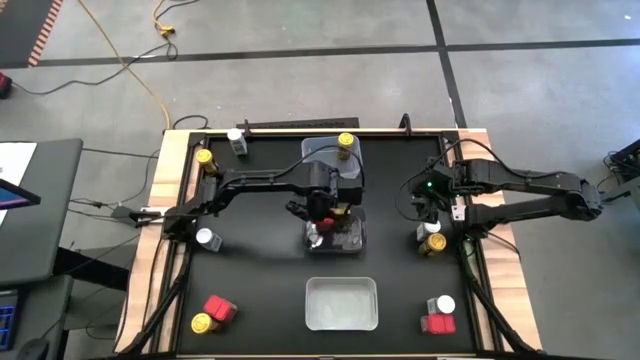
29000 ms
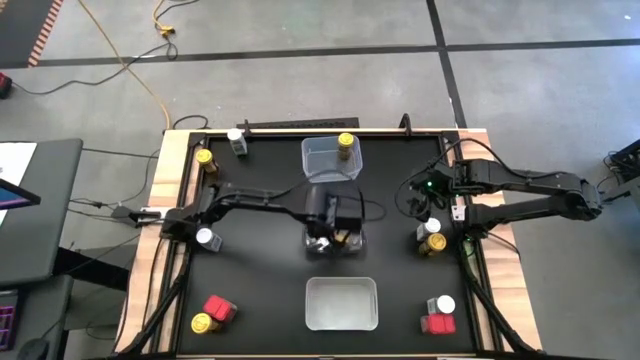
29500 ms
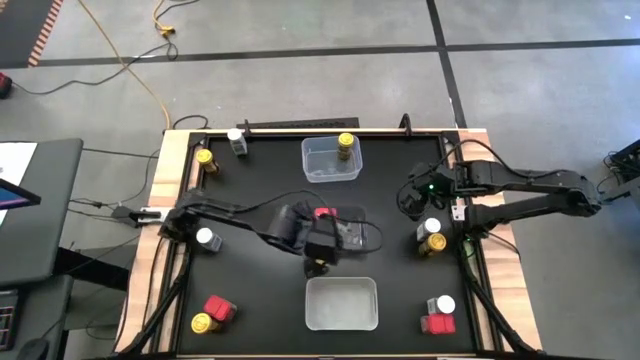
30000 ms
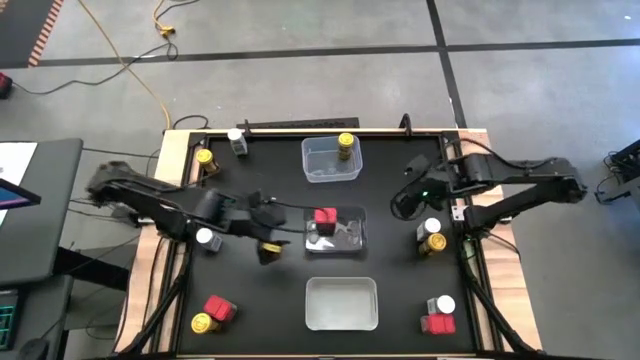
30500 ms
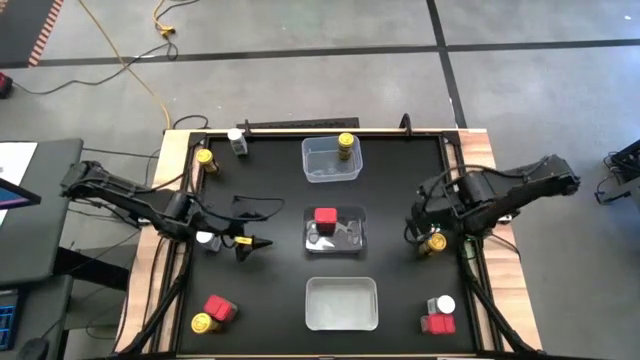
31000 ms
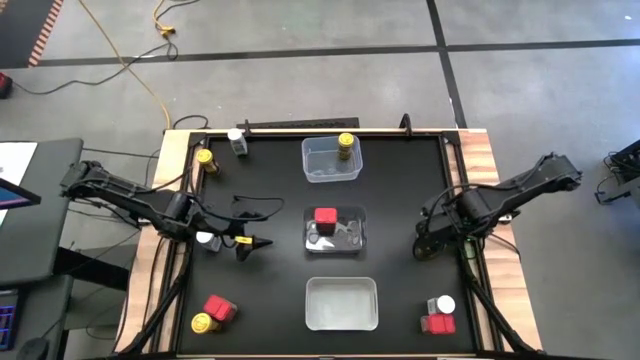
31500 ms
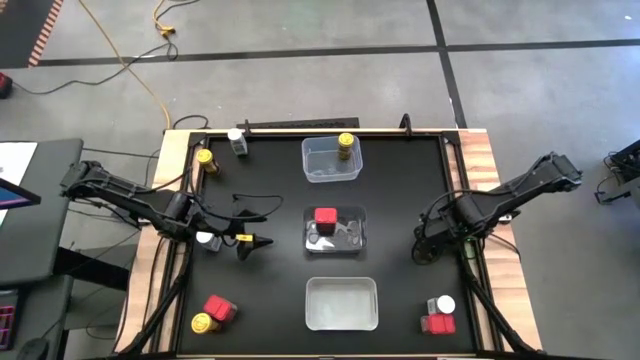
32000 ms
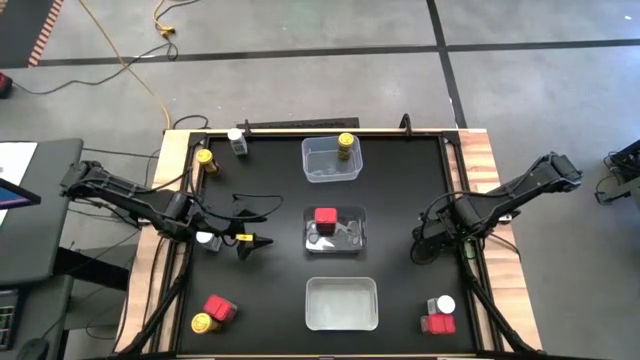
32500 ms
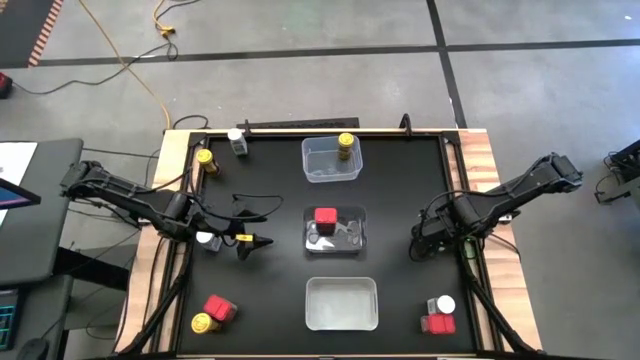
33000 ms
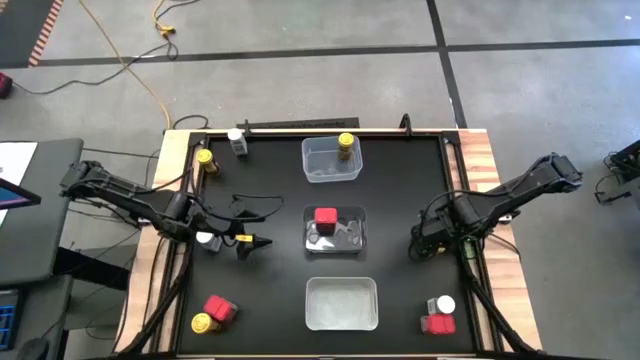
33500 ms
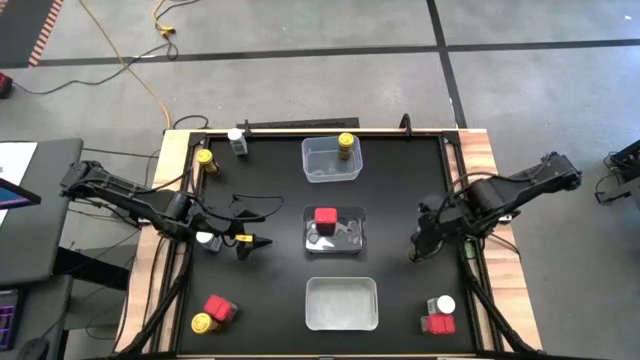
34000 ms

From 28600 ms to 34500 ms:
Task: Sort spices by type
Put the right yellow seasoning bottle into the transparent bin

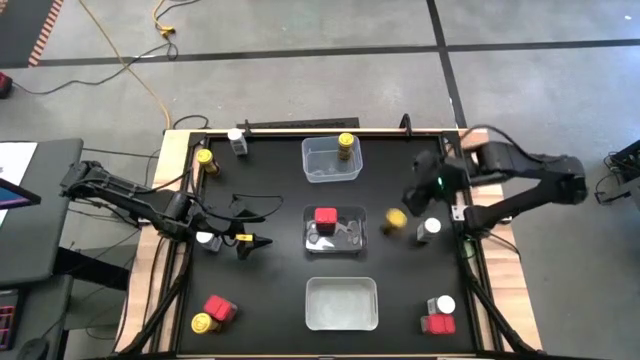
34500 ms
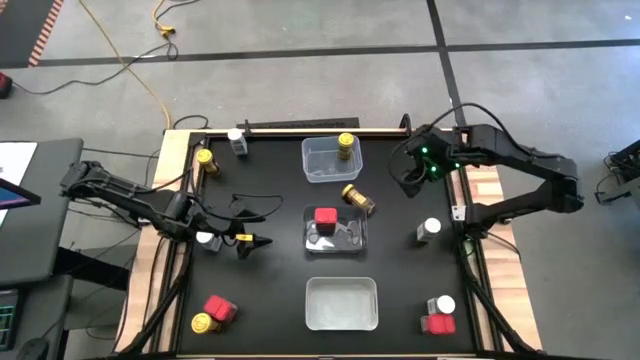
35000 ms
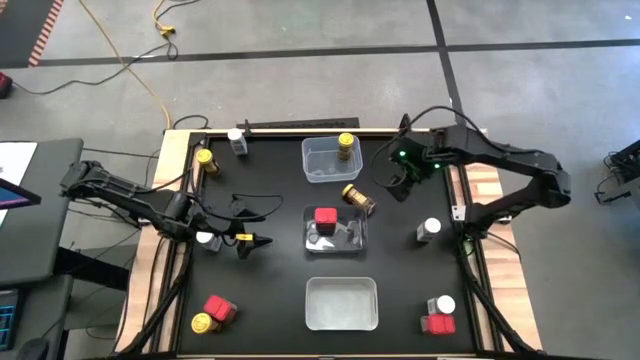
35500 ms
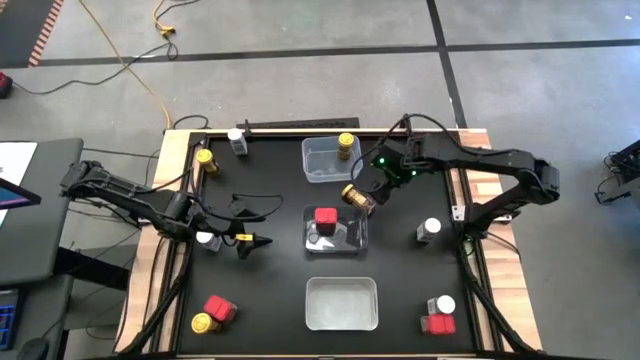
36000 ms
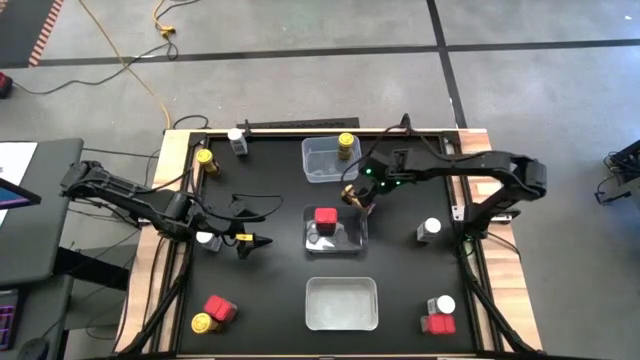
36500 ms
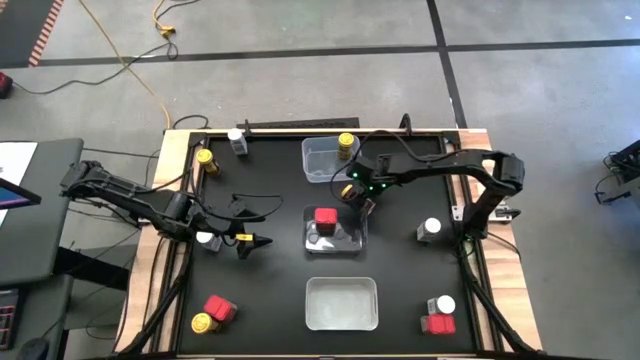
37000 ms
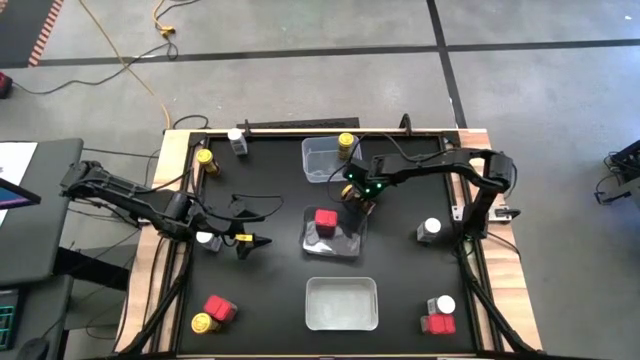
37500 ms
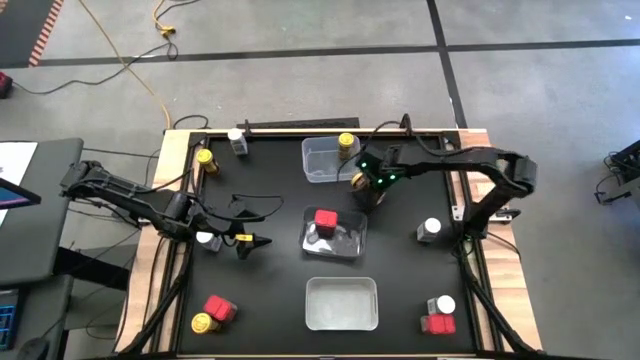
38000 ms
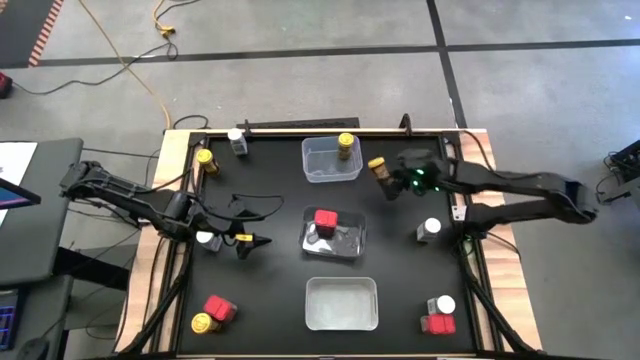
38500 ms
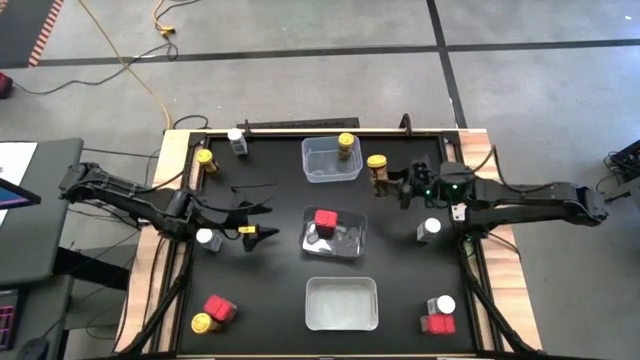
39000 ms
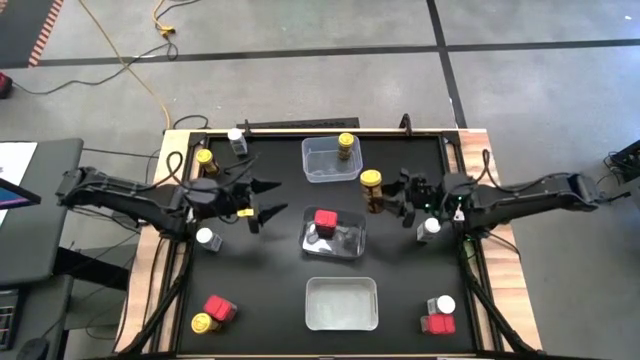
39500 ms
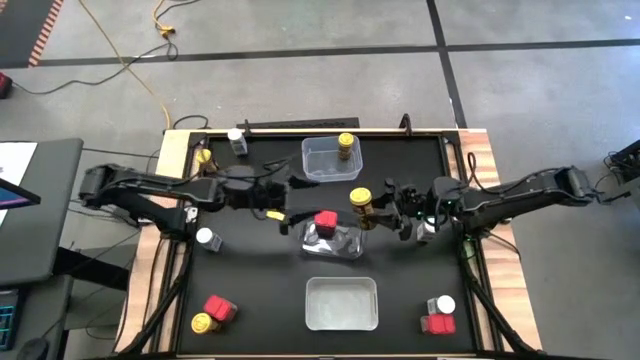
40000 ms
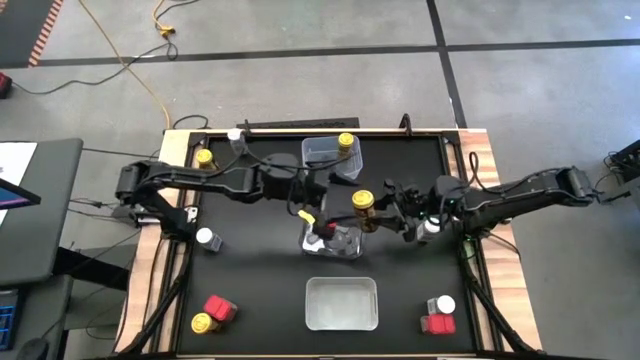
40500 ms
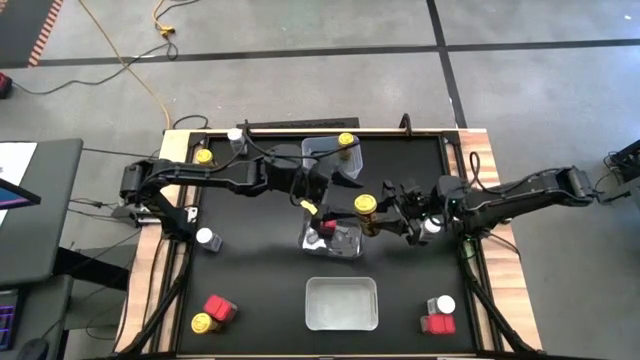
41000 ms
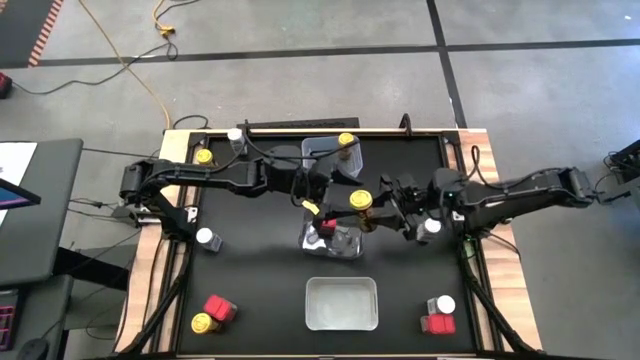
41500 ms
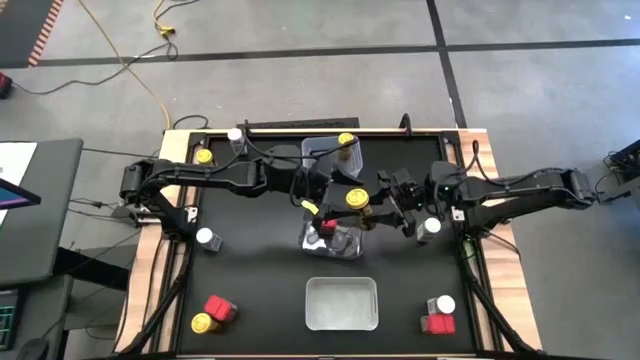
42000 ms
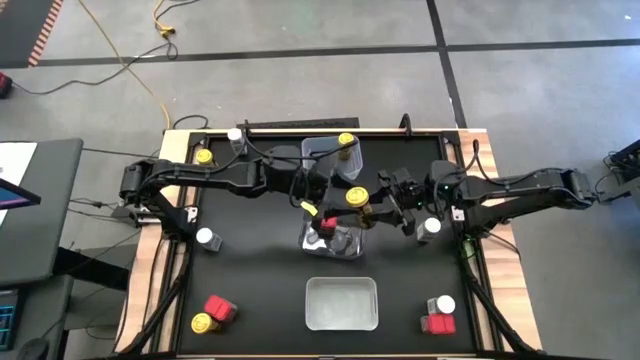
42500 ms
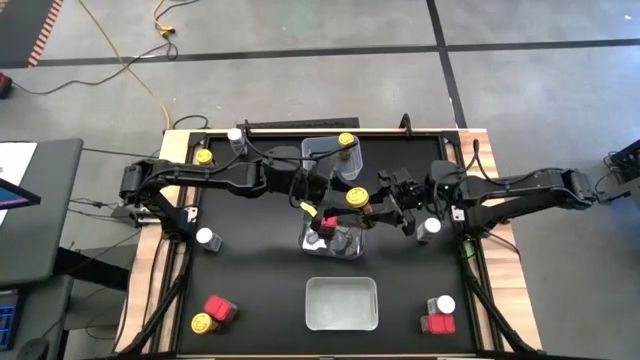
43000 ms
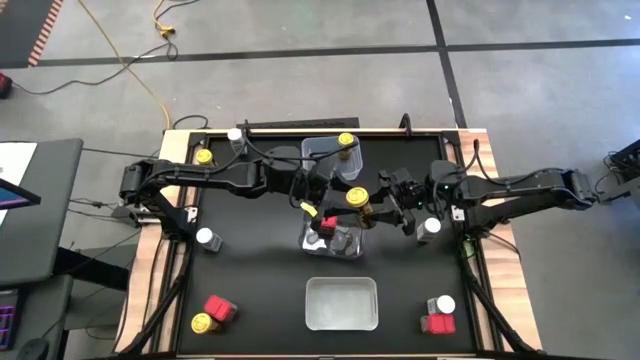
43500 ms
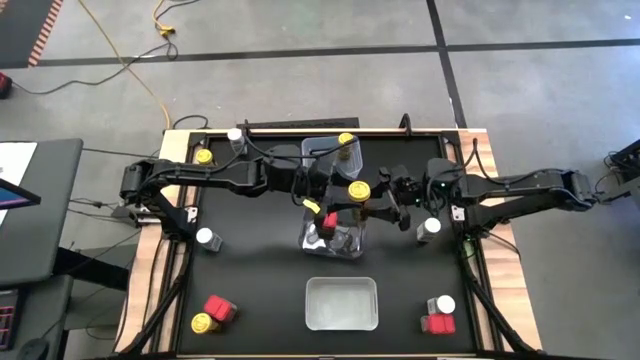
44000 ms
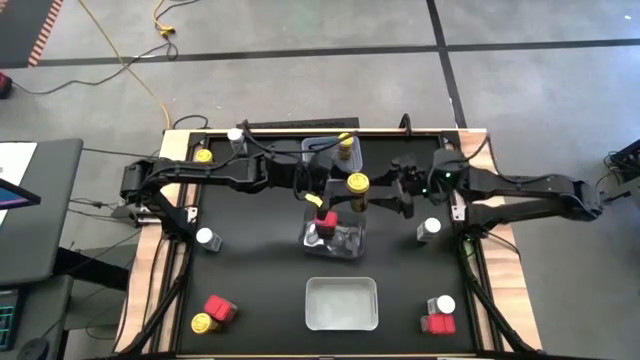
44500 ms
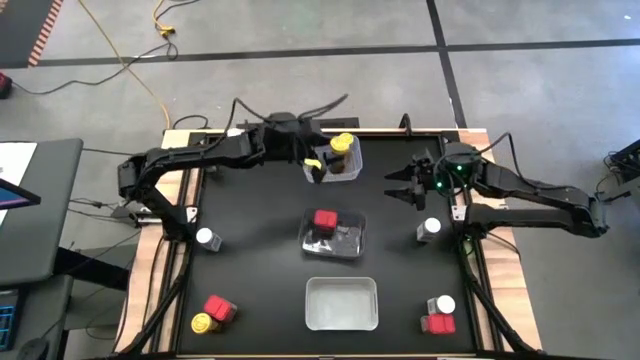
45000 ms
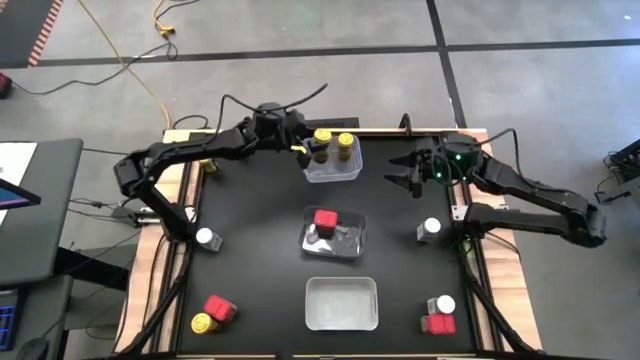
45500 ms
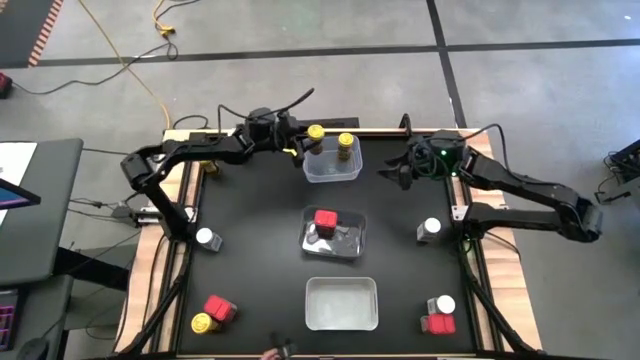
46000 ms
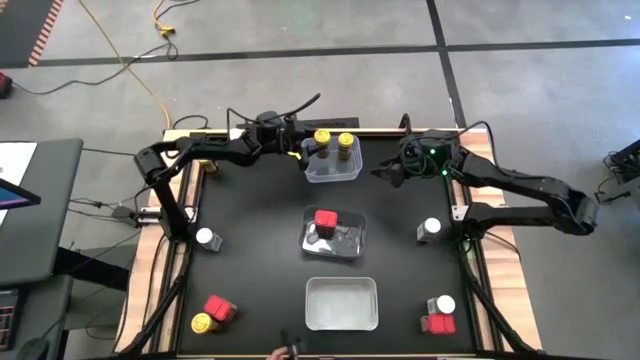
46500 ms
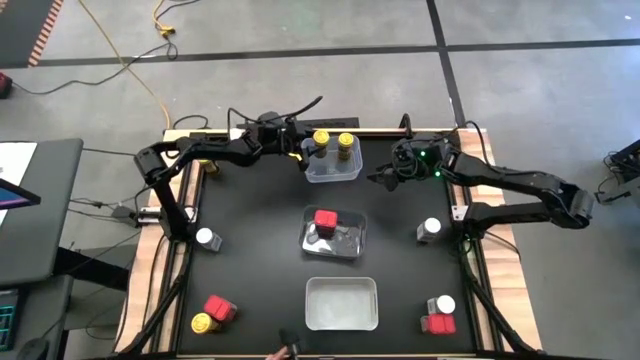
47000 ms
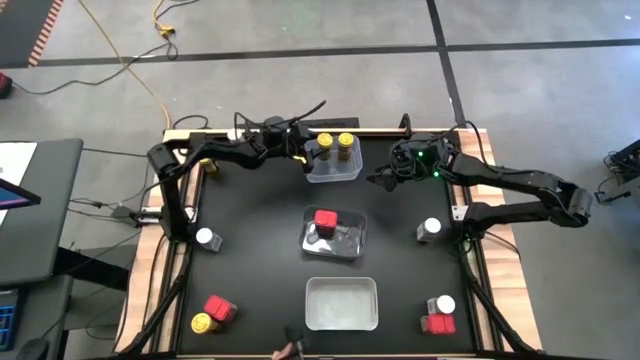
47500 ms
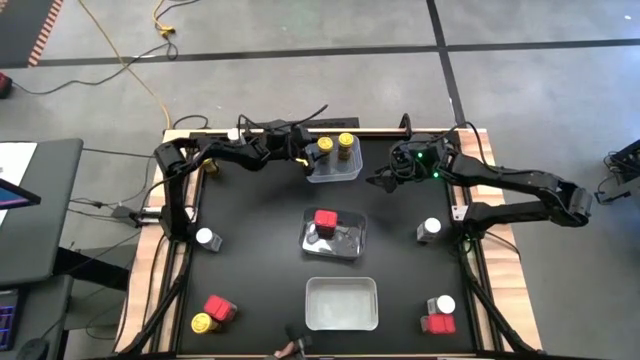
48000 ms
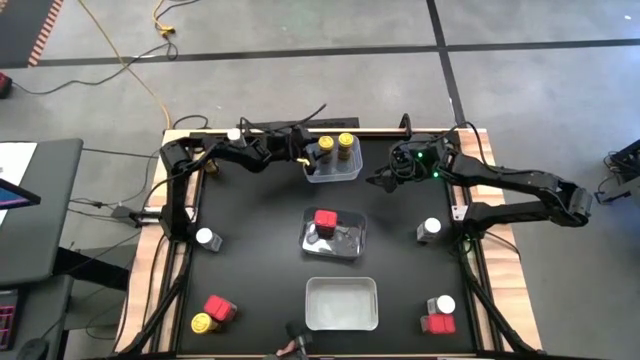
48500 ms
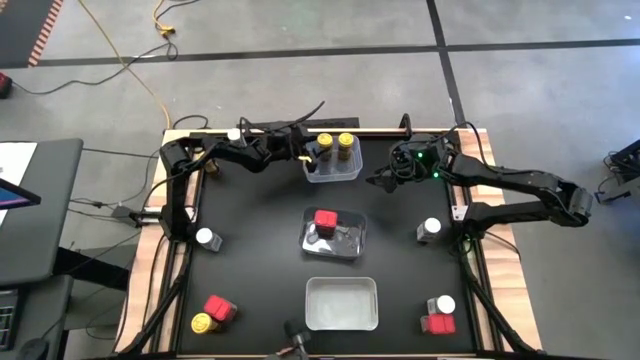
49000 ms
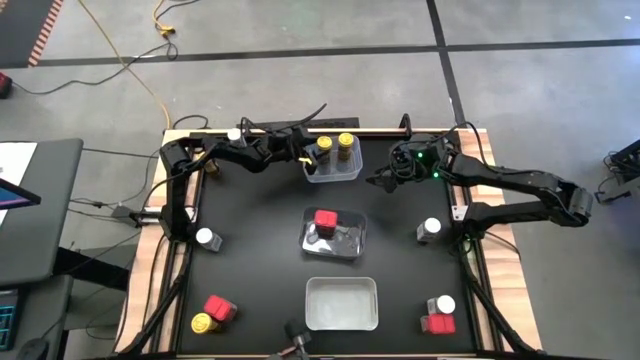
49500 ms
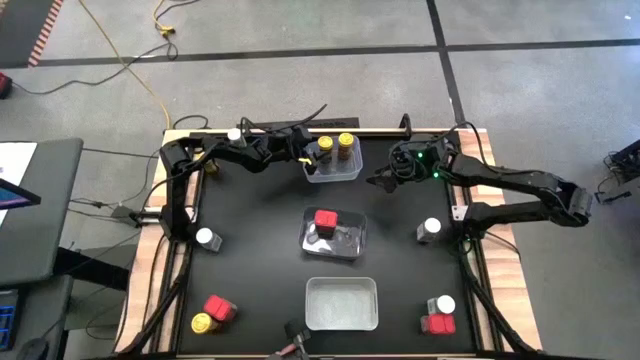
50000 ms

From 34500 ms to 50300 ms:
Put the right yellow seasoning bottle into the transparent bin
